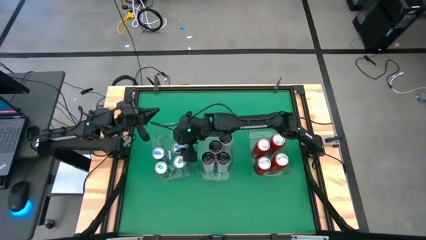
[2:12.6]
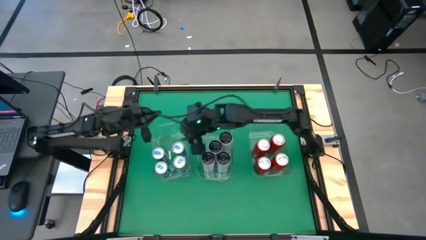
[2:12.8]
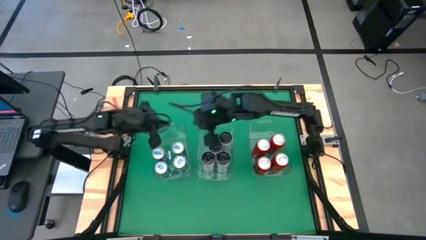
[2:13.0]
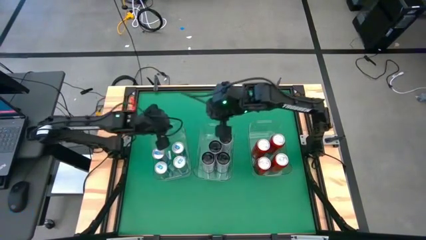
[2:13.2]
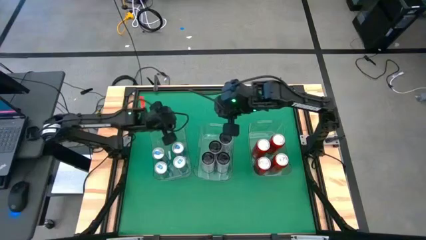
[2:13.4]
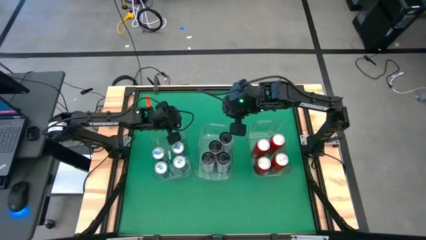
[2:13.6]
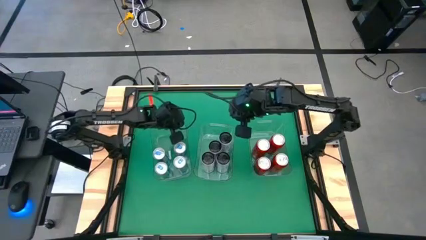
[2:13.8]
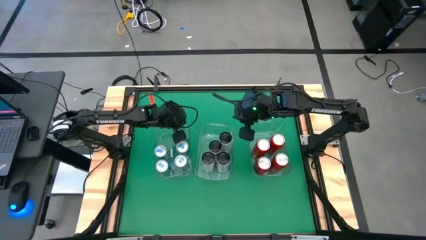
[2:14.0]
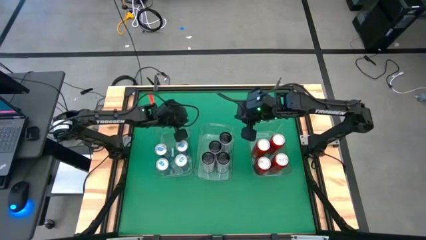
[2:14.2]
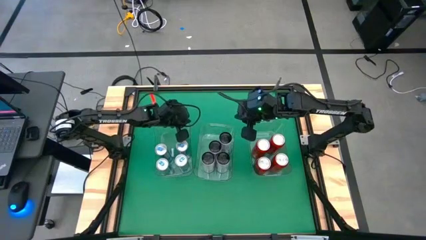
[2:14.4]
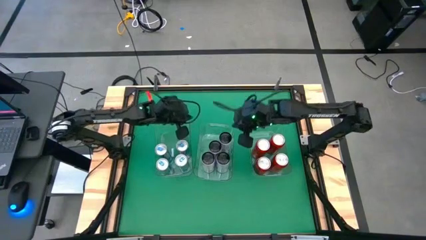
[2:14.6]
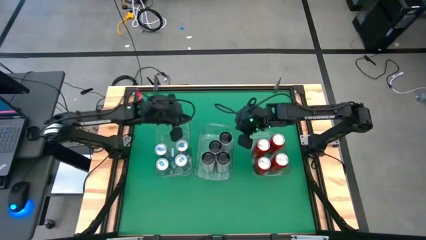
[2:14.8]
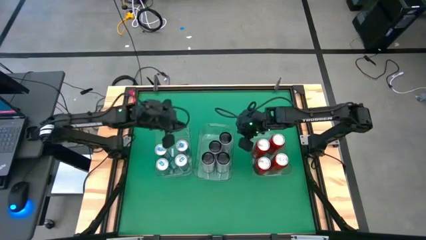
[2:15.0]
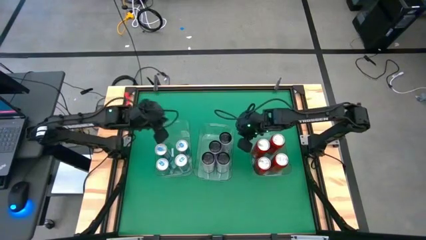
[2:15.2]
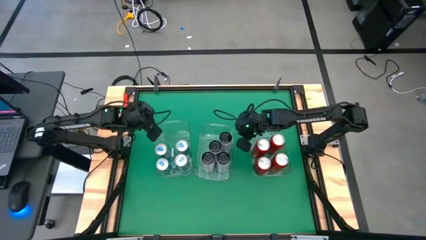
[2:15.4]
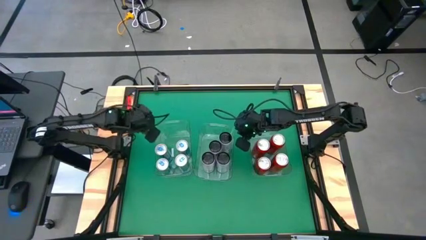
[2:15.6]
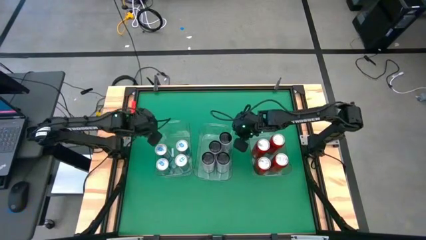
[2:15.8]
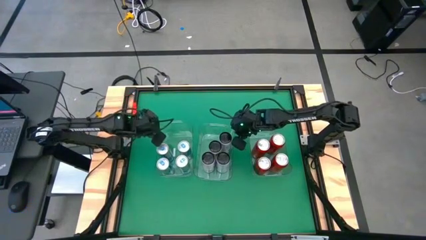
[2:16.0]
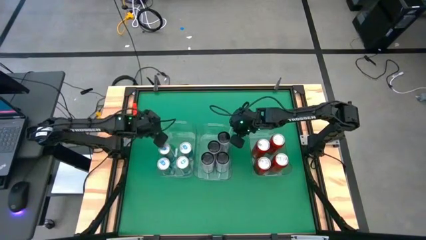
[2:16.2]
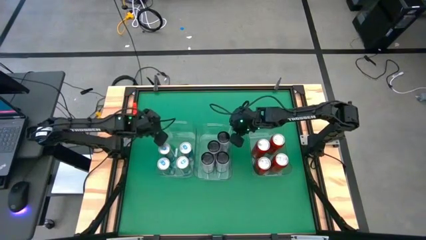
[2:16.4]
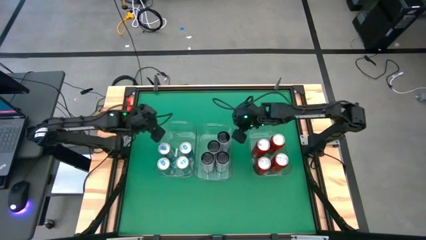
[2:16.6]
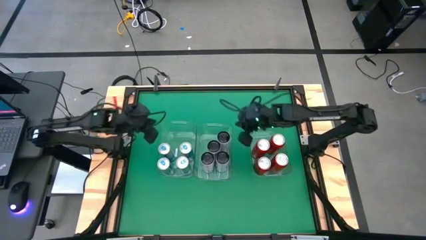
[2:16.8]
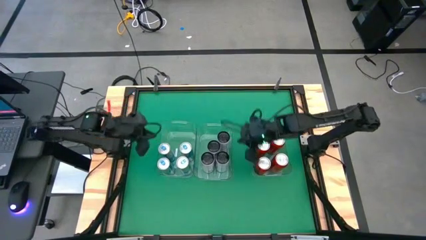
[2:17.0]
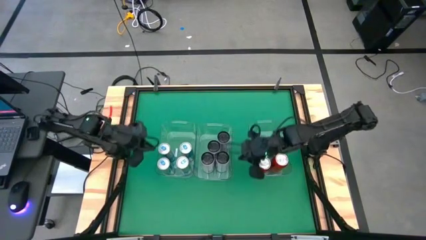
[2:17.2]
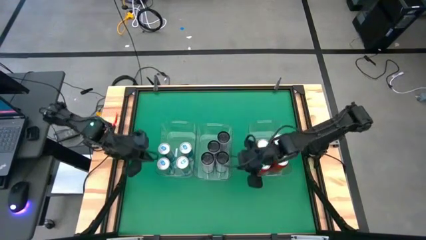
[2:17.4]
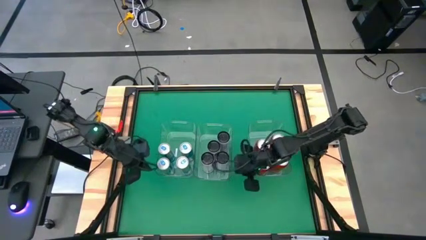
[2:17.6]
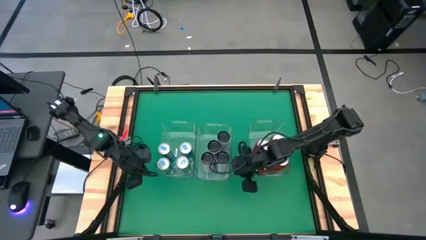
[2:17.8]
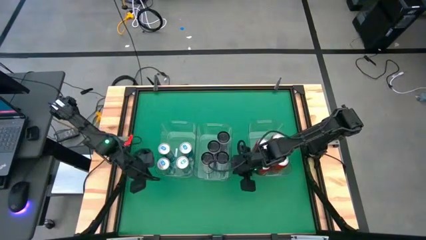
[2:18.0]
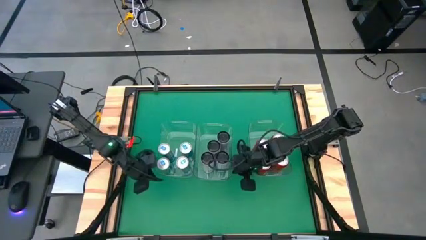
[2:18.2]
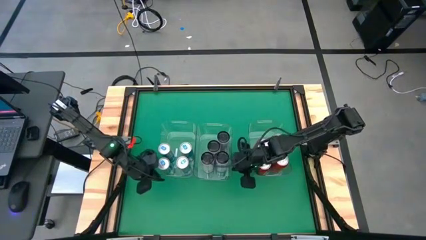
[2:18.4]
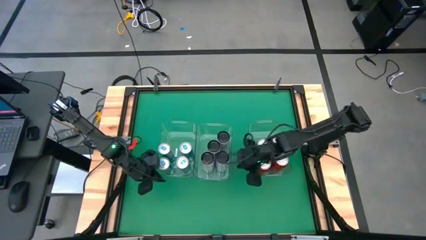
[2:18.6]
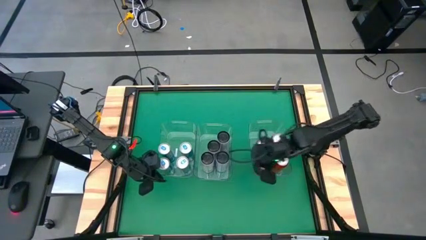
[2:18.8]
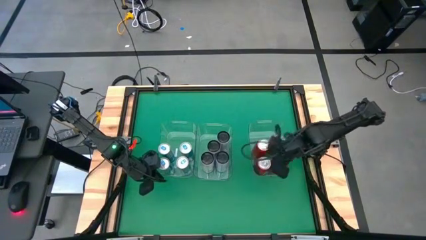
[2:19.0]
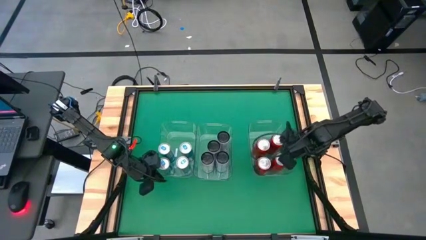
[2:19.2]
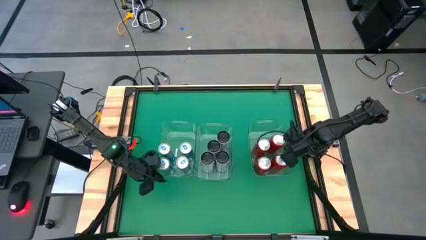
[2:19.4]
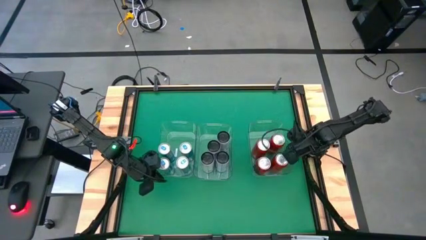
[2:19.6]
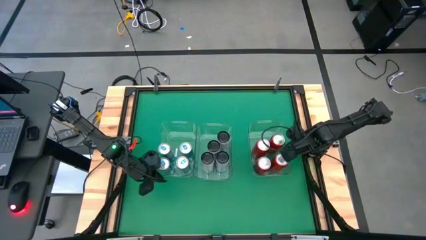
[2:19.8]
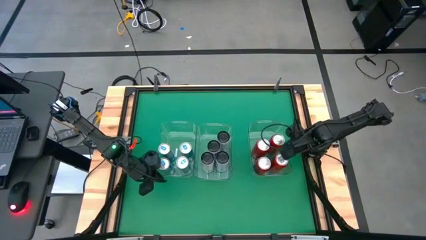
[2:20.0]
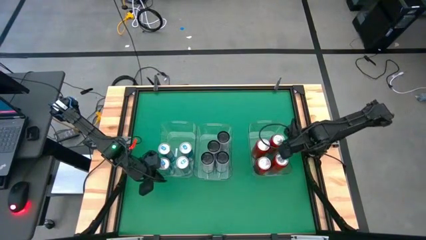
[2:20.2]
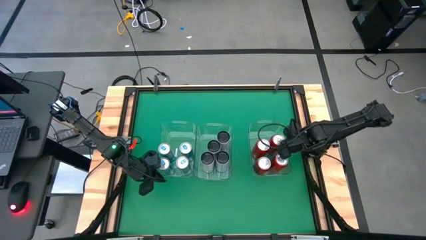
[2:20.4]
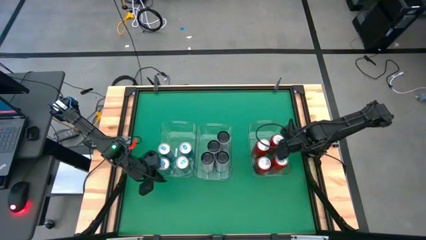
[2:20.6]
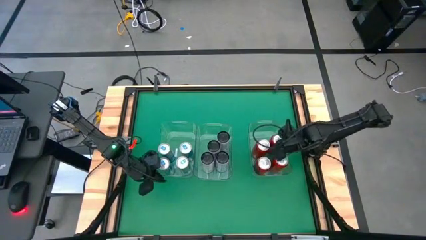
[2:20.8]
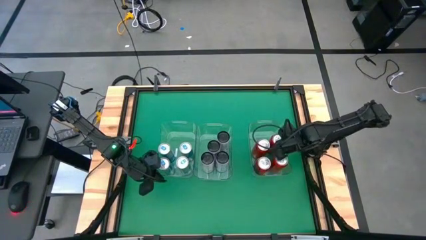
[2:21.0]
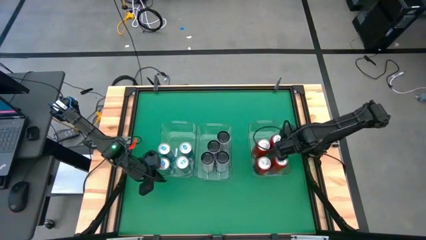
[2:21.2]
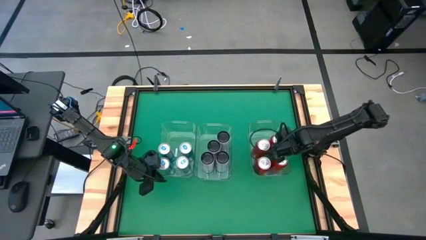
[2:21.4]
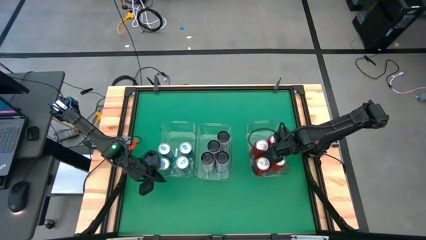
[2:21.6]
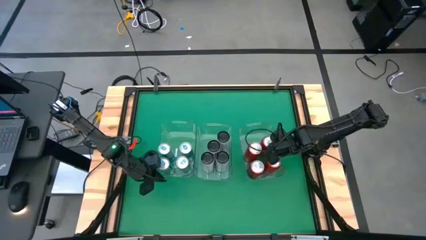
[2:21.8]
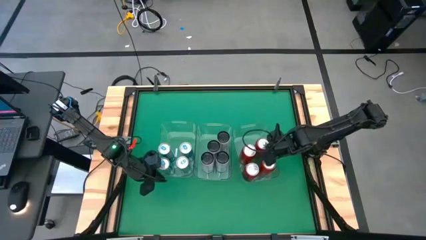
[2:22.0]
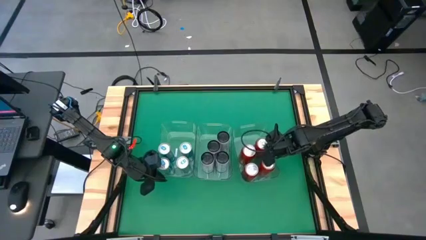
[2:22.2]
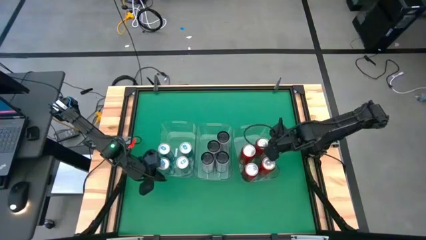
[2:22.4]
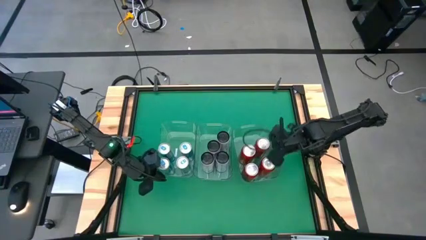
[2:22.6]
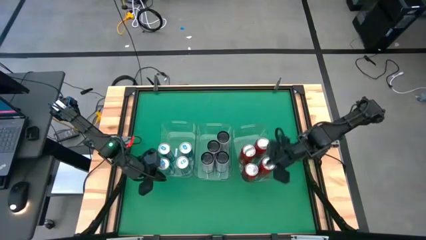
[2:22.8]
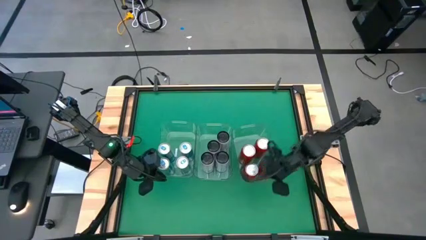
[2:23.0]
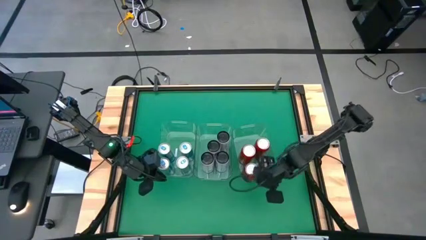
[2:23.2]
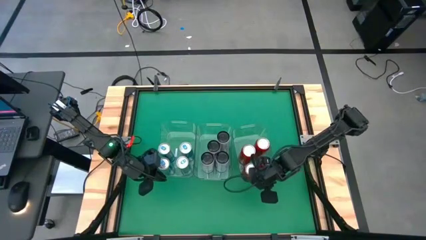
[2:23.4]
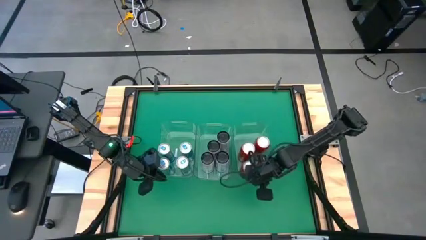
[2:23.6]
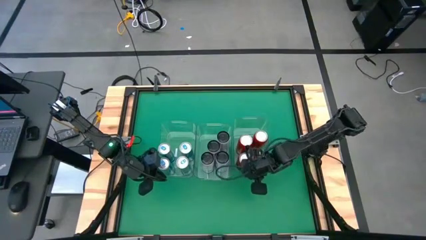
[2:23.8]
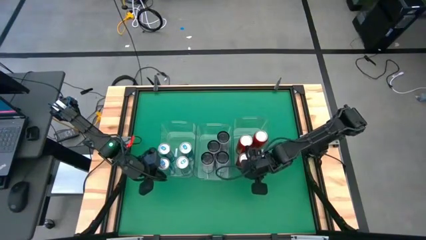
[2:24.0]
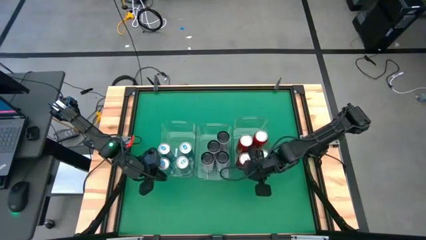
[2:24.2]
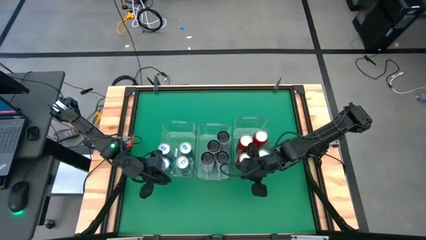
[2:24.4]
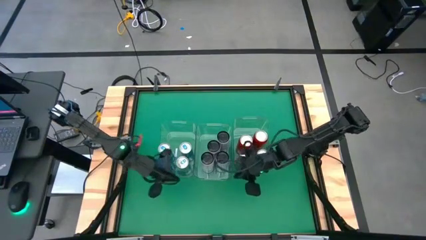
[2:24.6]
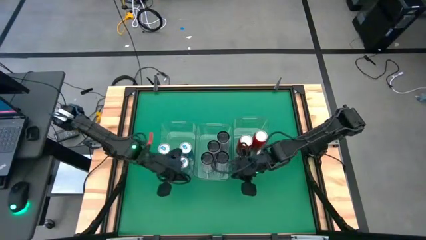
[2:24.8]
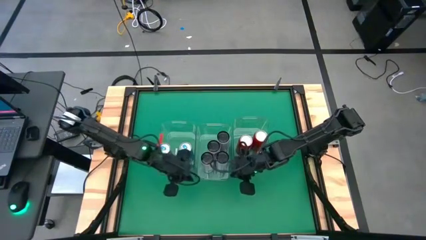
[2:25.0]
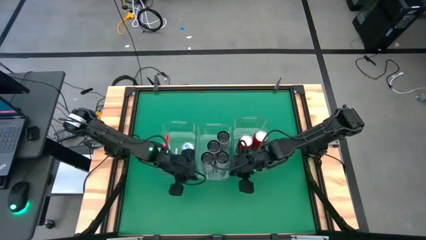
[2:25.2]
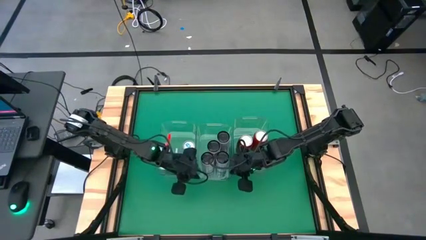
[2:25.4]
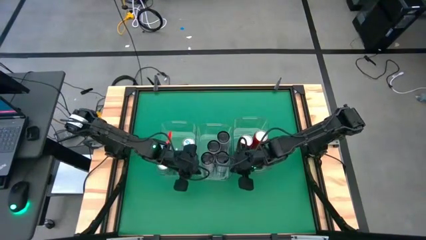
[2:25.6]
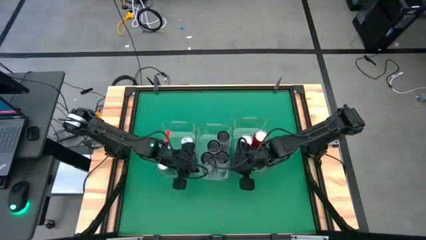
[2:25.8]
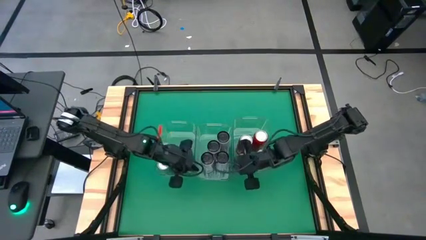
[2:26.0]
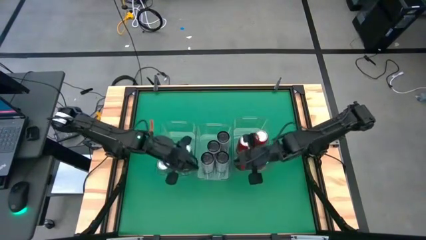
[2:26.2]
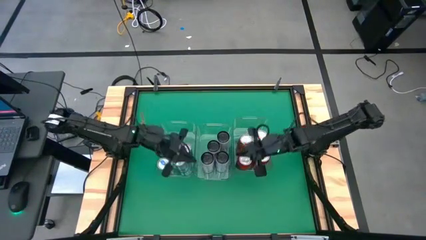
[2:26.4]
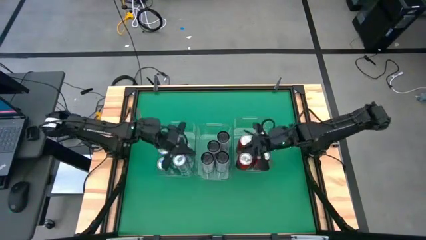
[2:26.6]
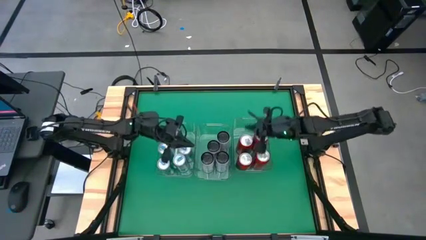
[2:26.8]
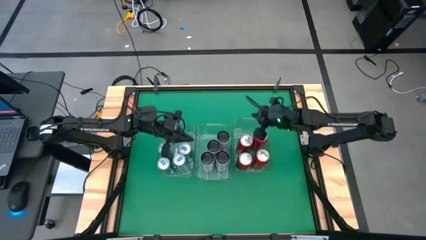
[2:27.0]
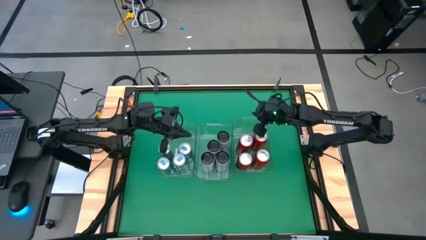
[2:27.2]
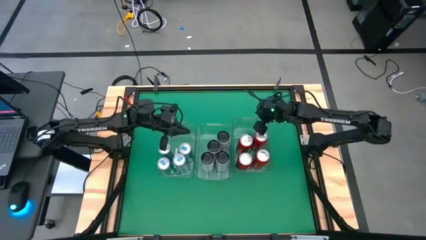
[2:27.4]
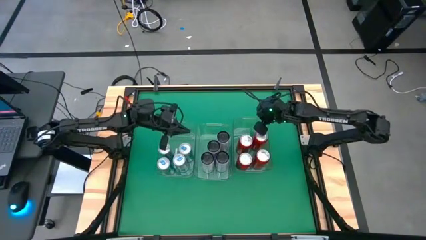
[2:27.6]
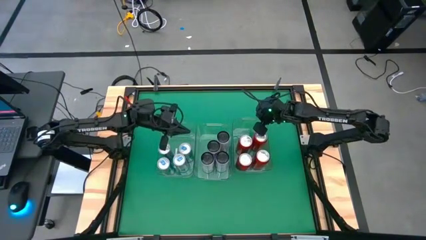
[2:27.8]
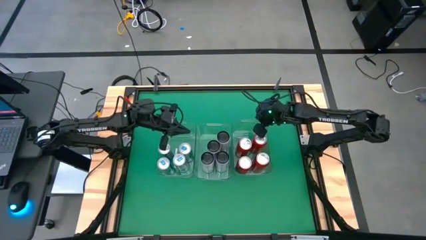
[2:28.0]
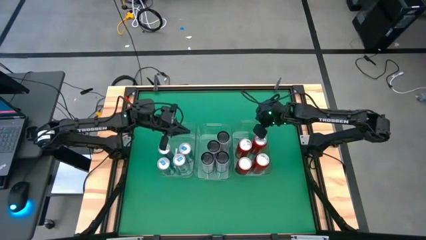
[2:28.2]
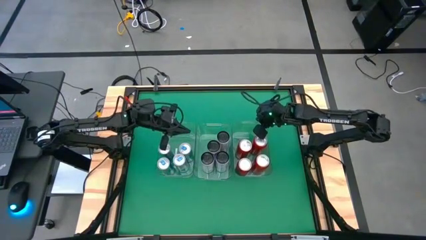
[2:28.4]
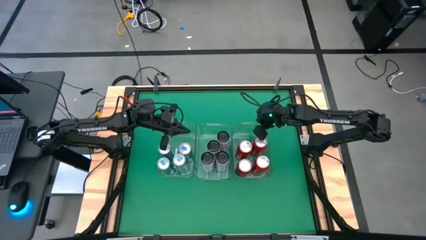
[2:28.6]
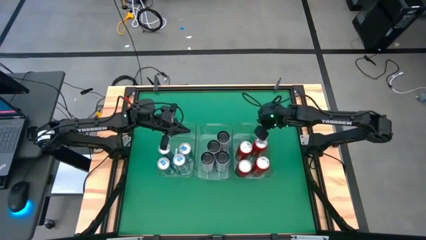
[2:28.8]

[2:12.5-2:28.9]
Task: Sort soda cans
Adjust the transparent bins
